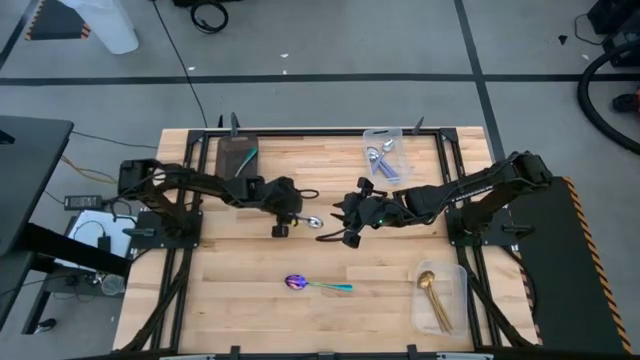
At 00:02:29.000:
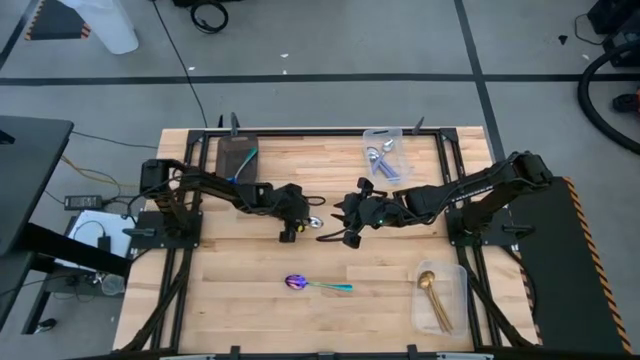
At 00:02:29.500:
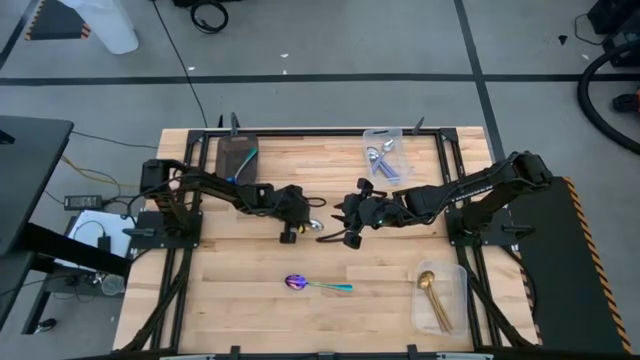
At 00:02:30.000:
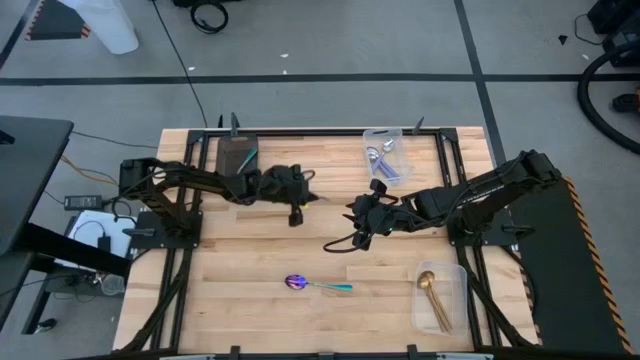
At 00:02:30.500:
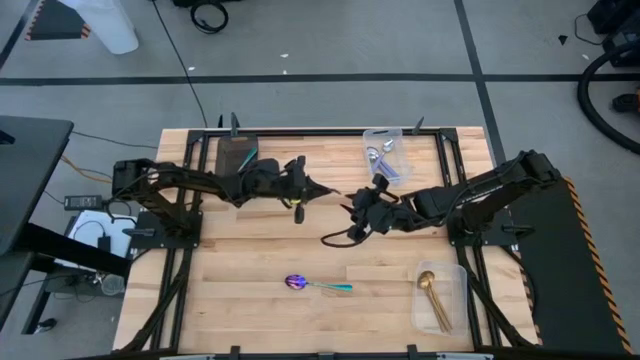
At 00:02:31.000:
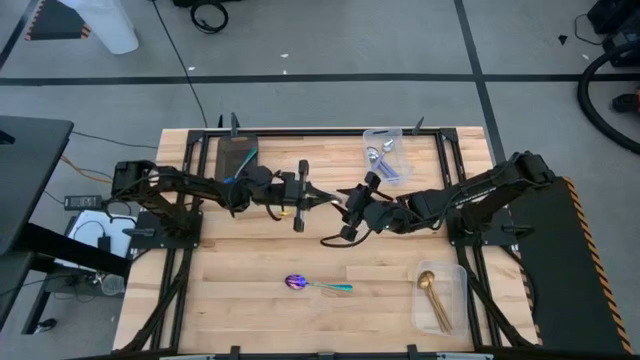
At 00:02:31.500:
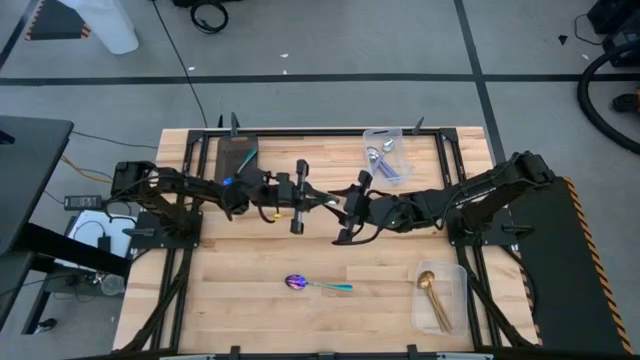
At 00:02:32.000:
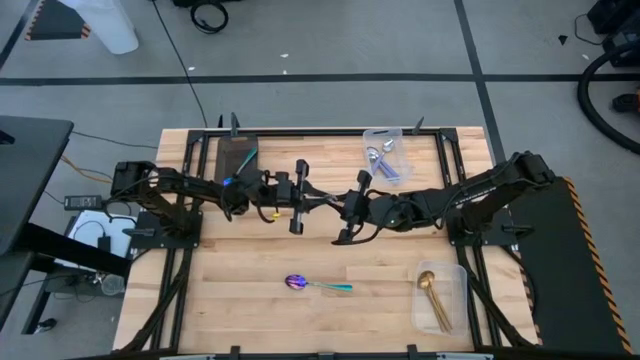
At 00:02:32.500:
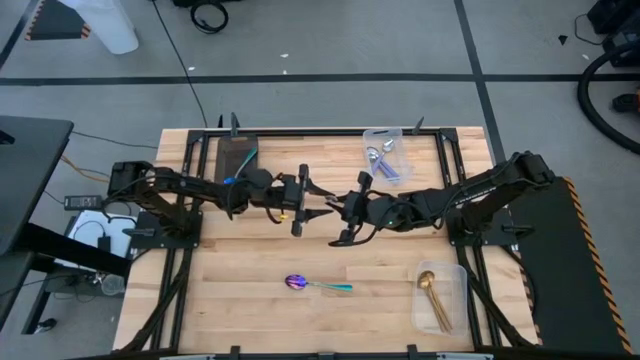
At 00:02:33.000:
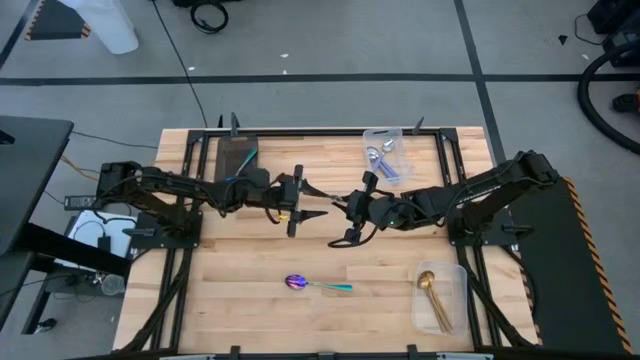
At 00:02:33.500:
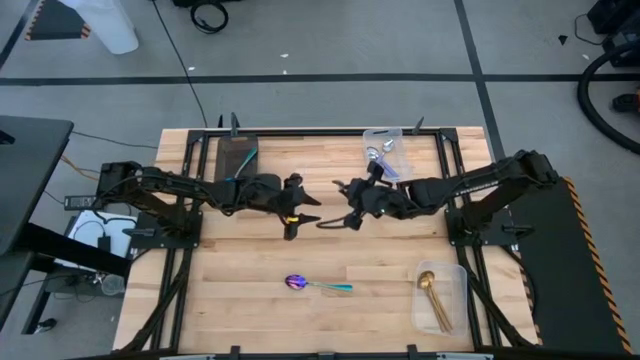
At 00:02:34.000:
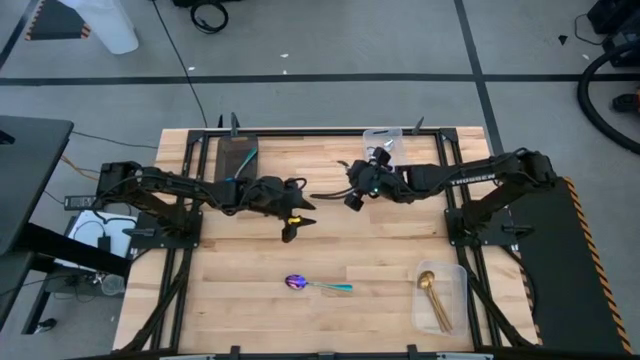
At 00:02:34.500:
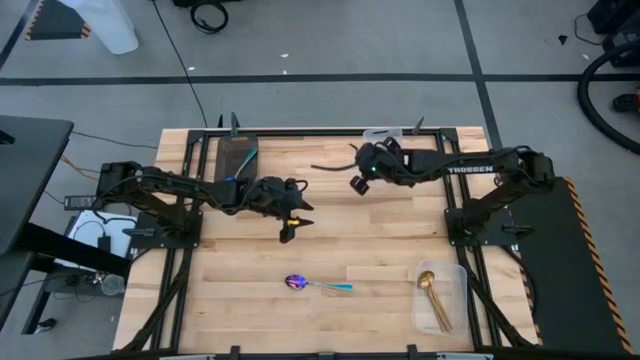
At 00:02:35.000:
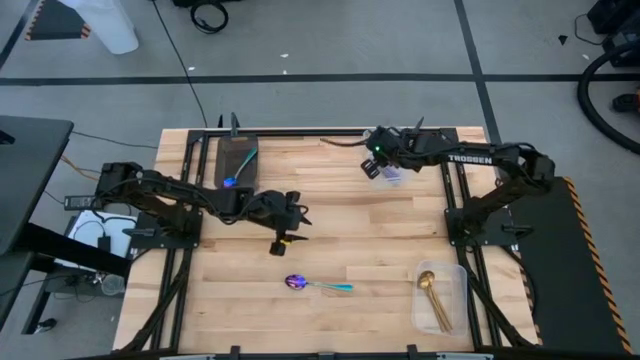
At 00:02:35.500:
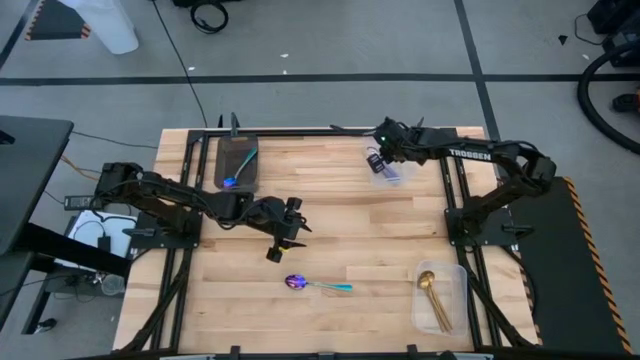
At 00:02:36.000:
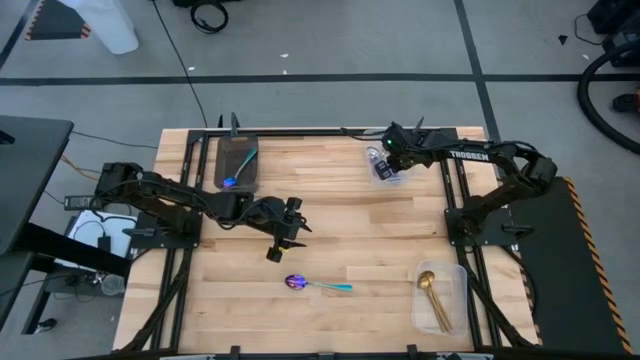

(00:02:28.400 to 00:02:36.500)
Task: Sort silverware by color (type)
Put the purple spoon into the top transparent bin

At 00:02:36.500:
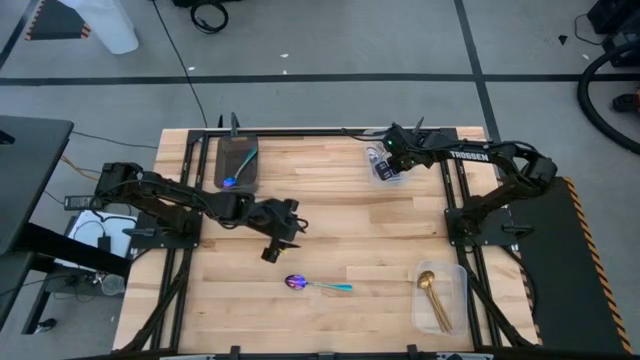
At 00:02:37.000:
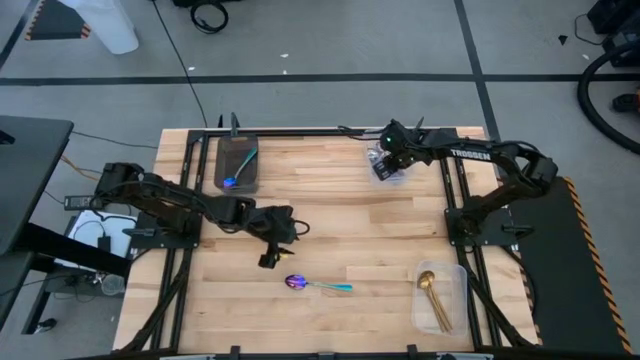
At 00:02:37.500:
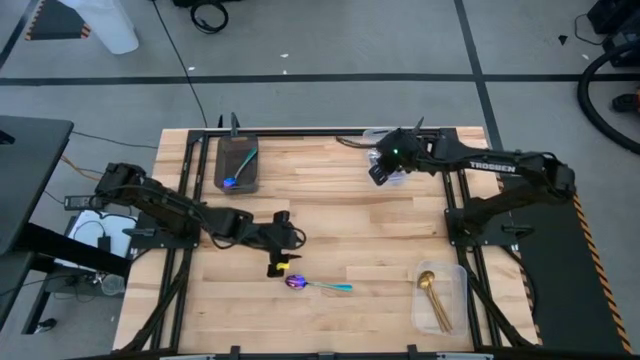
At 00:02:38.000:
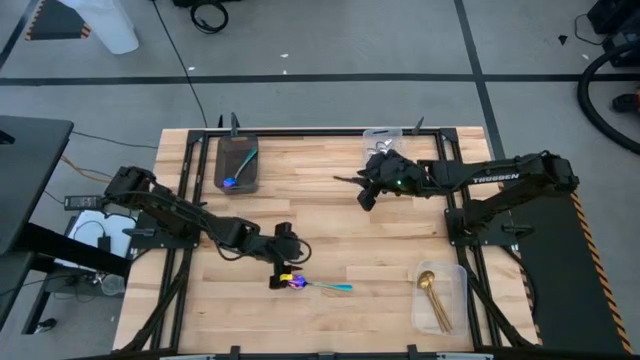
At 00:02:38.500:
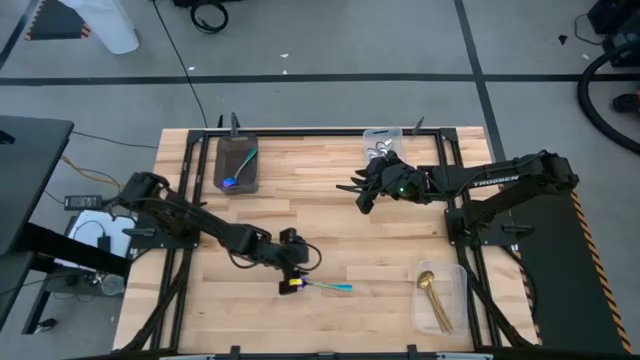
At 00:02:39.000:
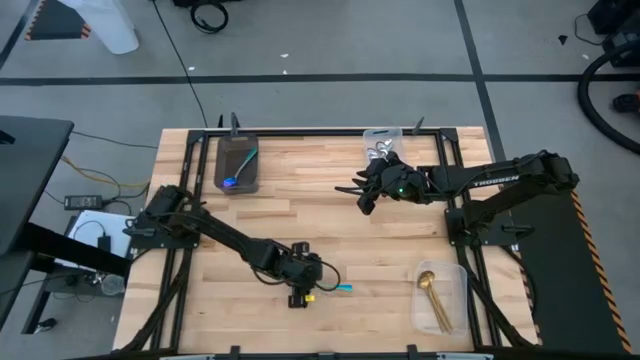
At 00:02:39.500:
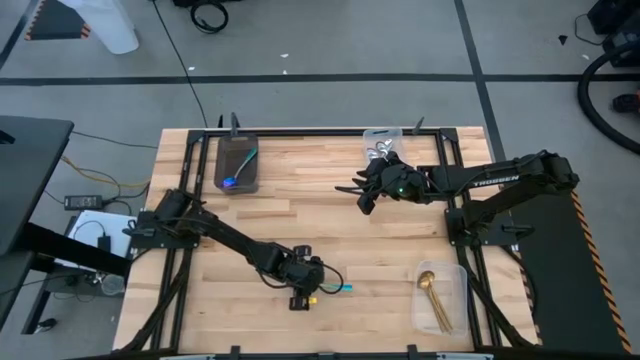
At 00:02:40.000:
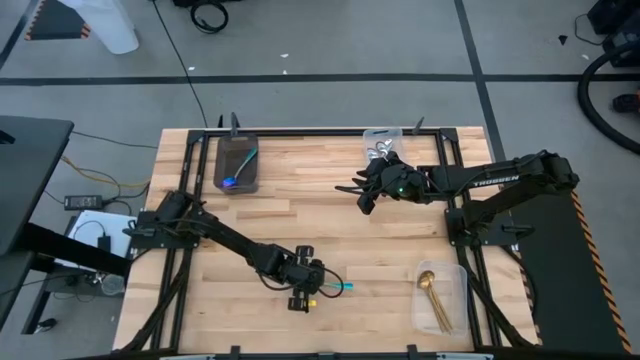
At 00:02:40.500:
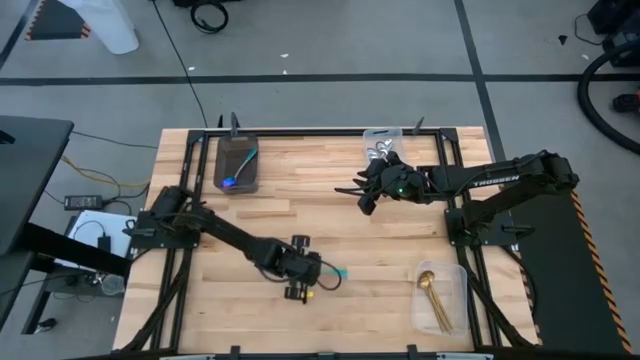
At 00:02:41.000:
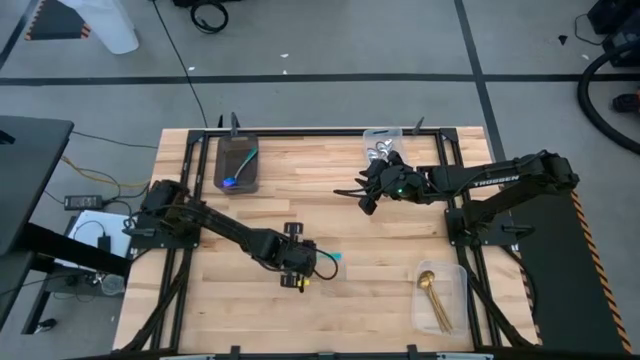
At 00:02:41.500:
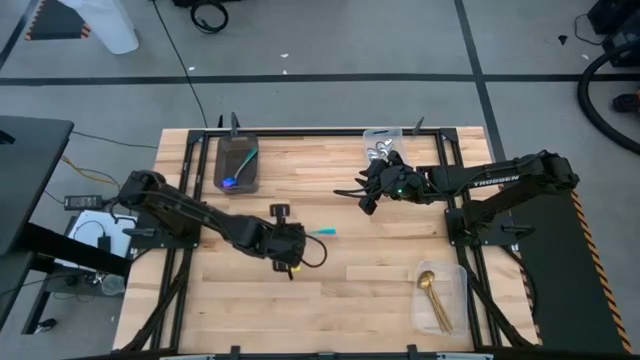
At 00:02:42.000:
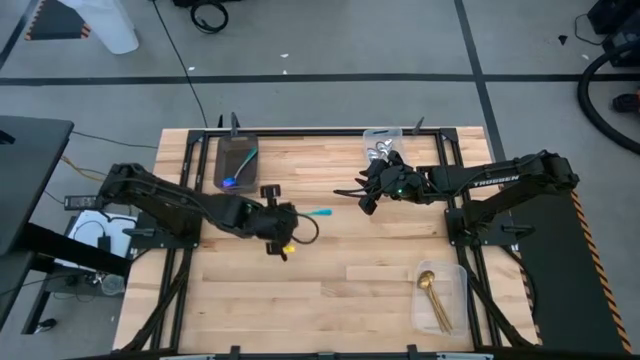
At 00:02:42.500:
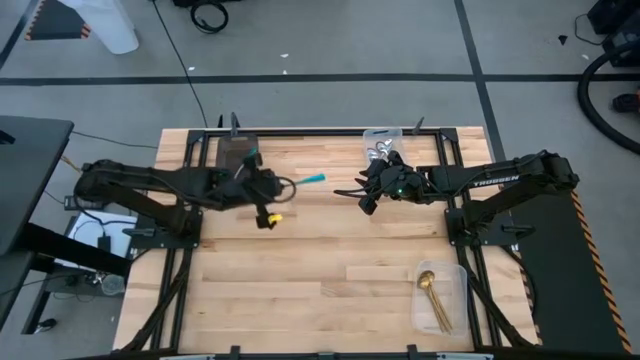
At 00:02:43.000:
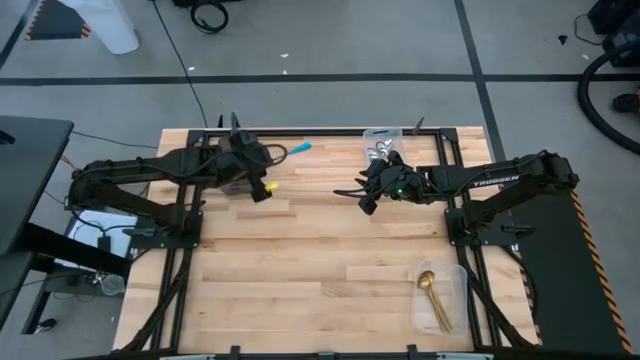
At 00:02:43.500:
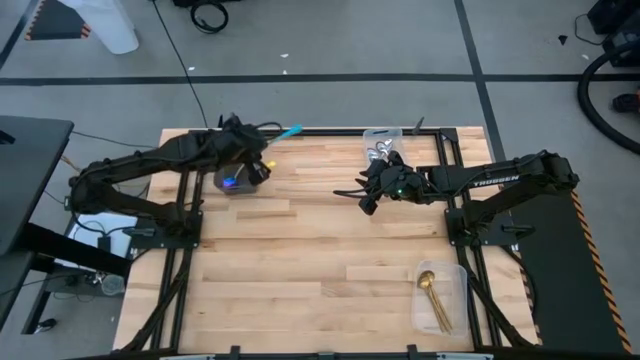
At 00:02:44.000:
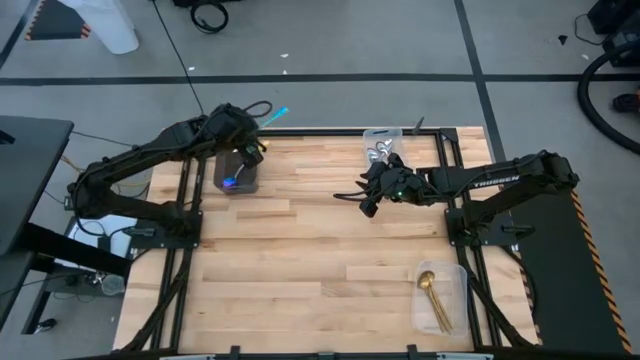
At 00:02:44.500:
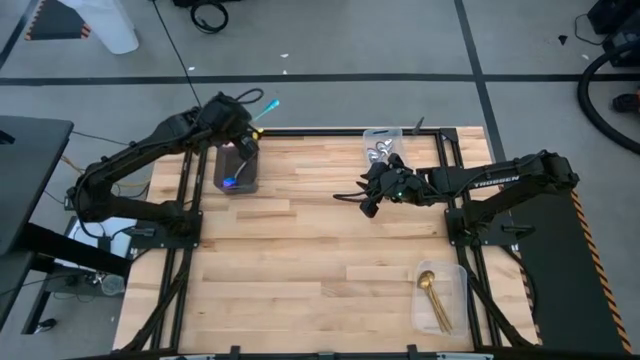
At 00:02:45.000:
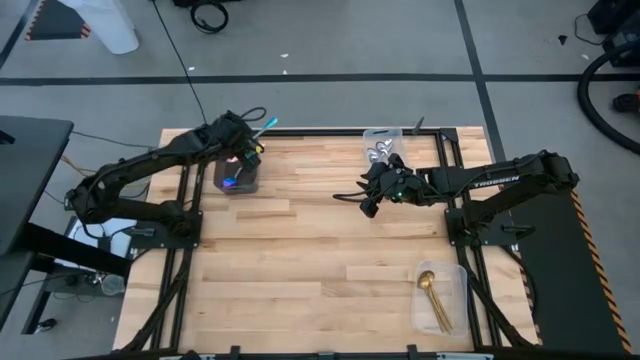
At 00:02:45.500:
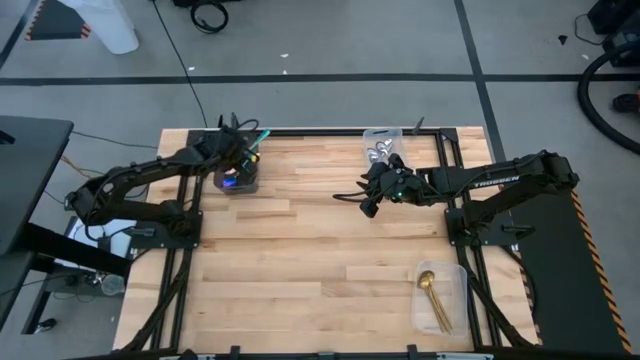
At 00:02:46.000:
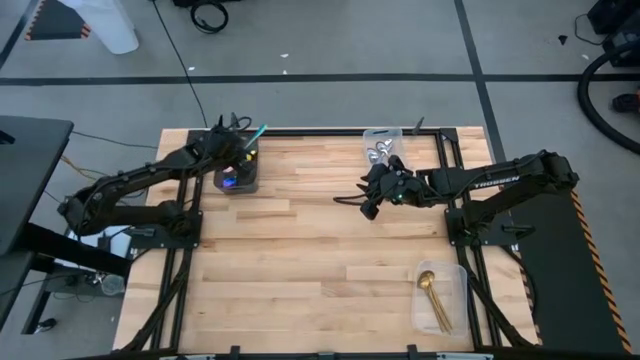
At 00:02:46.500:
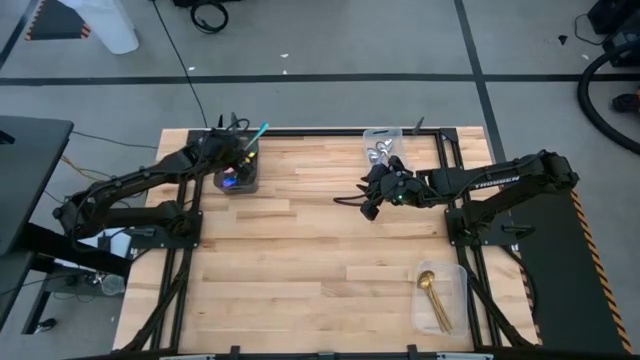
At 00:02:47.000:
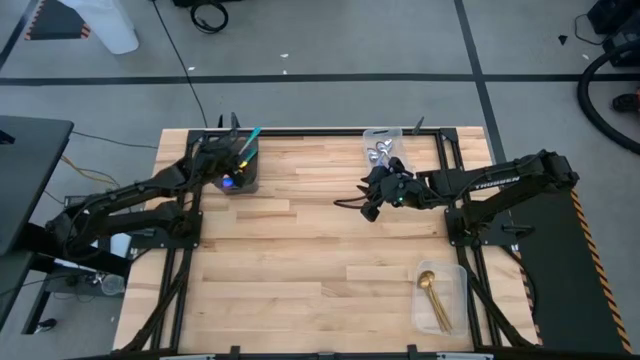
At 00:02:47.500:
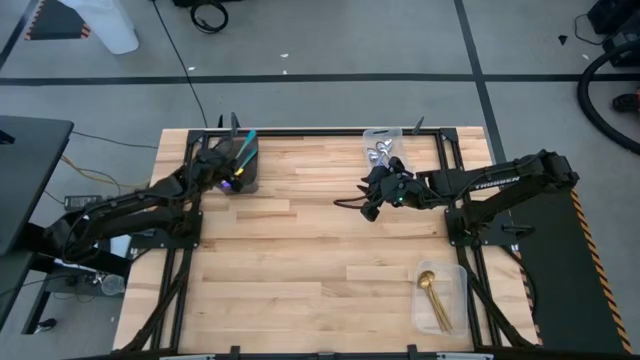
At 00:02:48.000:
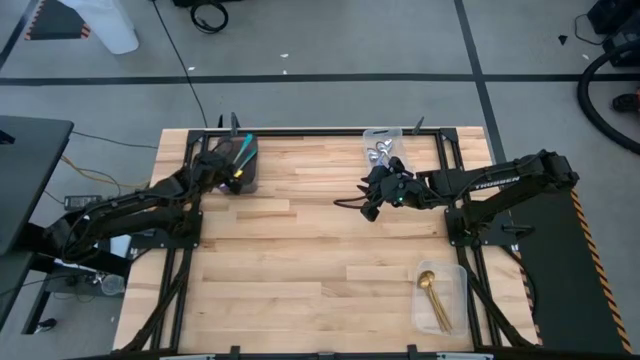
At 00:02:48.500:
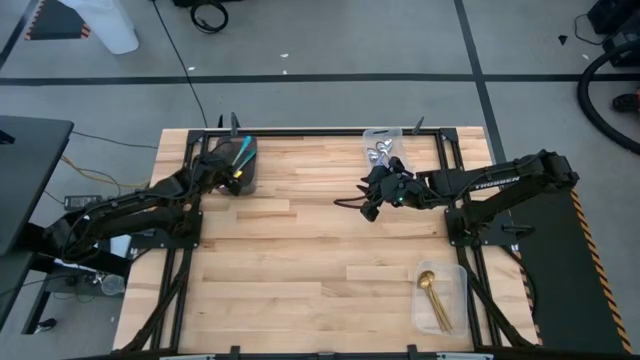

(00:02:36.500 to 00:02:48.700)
Put the blue spoon into the black bin
